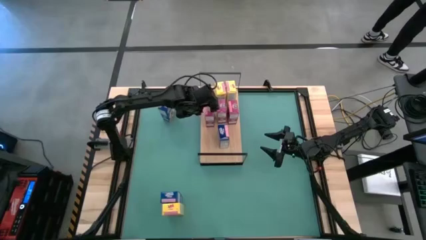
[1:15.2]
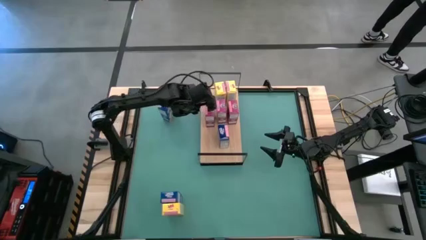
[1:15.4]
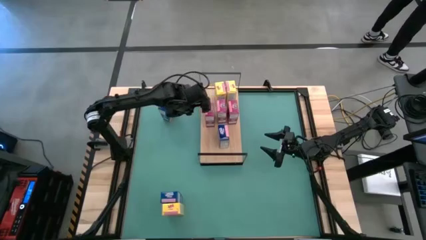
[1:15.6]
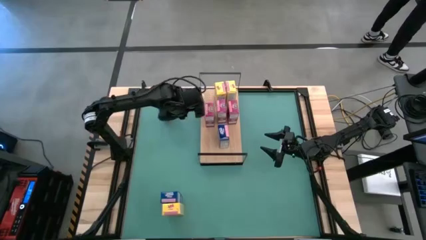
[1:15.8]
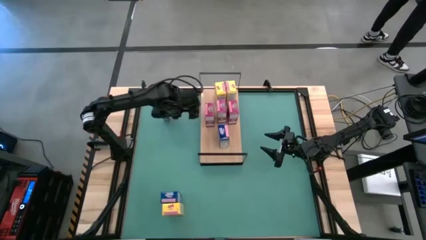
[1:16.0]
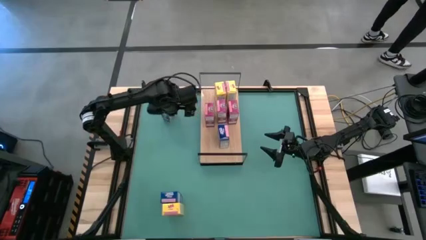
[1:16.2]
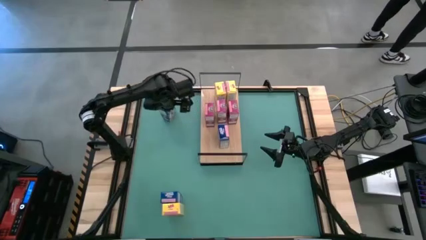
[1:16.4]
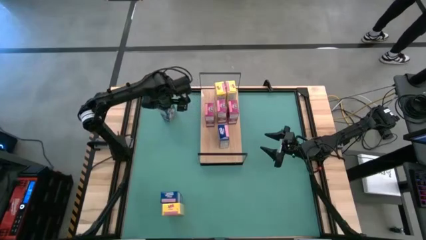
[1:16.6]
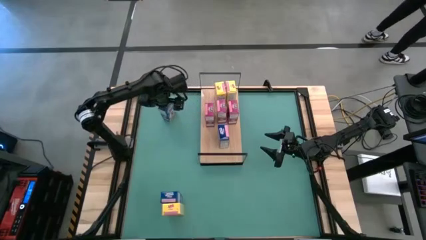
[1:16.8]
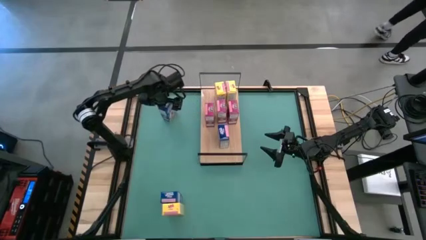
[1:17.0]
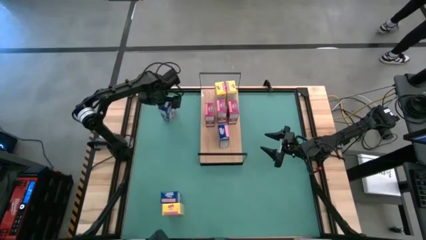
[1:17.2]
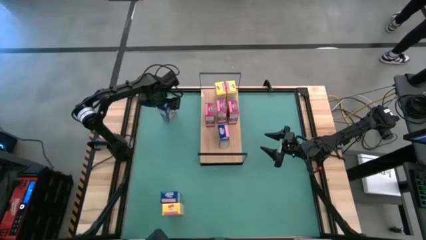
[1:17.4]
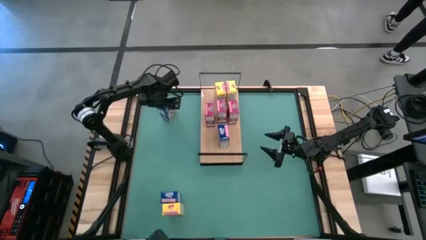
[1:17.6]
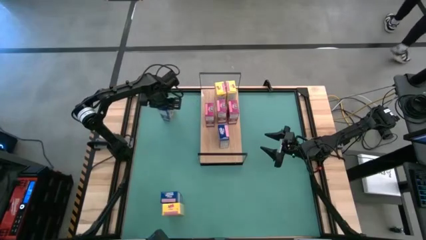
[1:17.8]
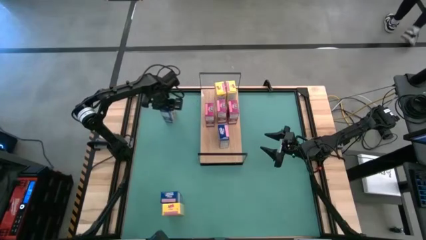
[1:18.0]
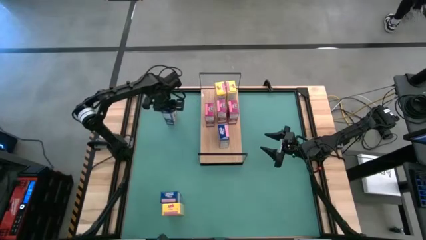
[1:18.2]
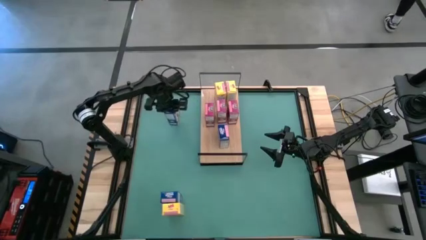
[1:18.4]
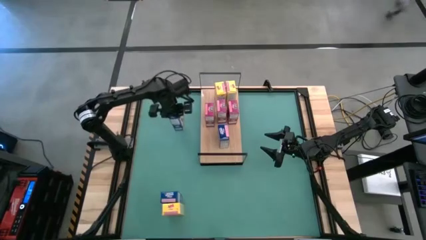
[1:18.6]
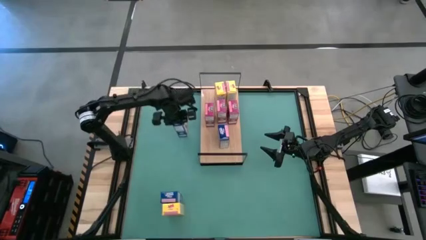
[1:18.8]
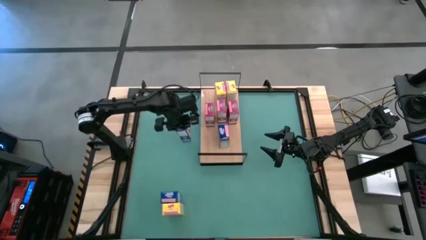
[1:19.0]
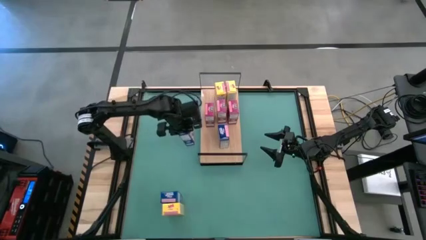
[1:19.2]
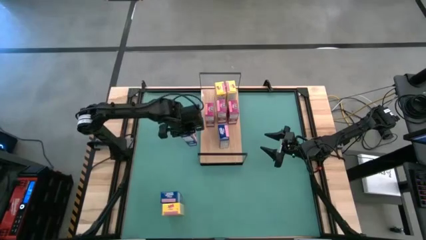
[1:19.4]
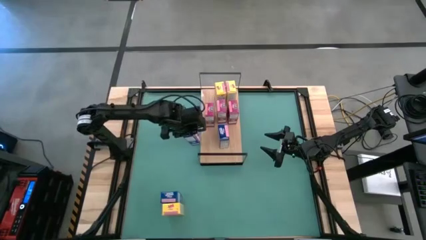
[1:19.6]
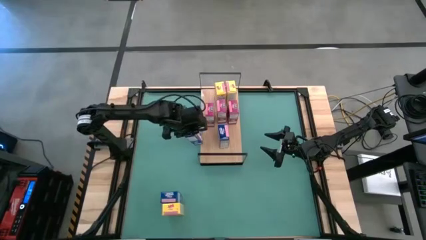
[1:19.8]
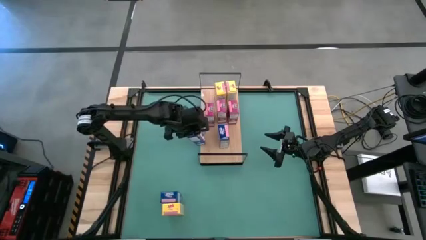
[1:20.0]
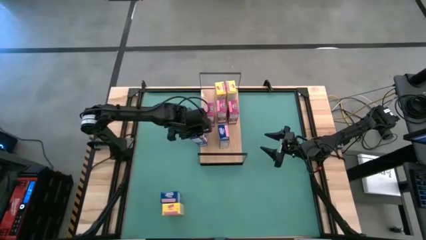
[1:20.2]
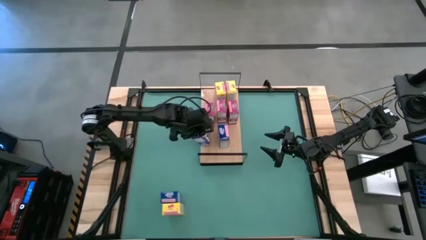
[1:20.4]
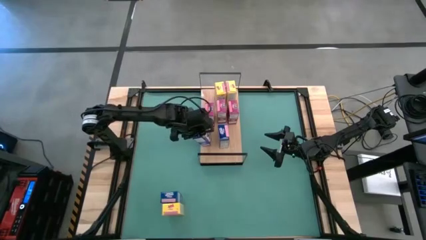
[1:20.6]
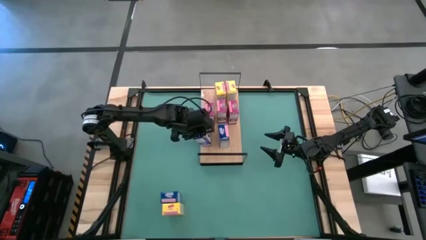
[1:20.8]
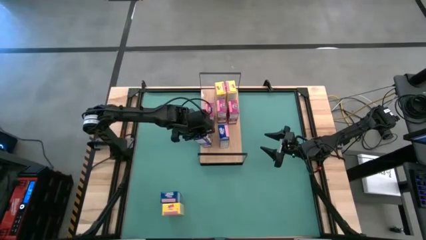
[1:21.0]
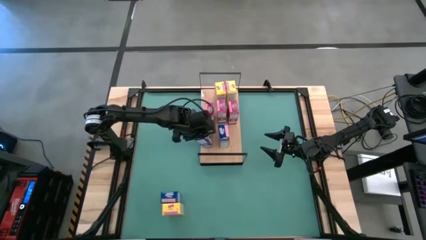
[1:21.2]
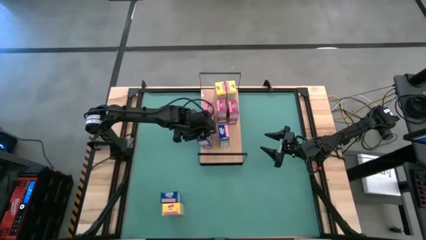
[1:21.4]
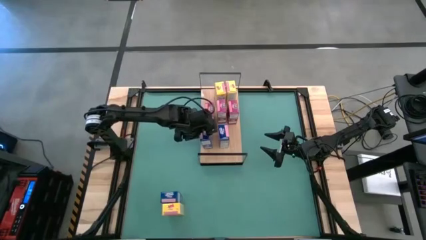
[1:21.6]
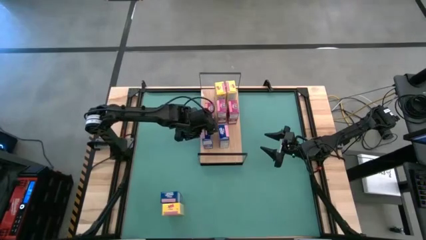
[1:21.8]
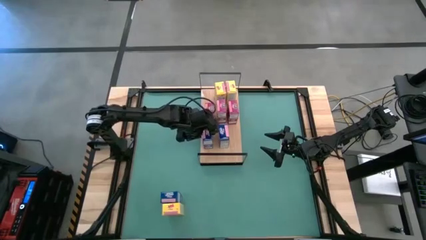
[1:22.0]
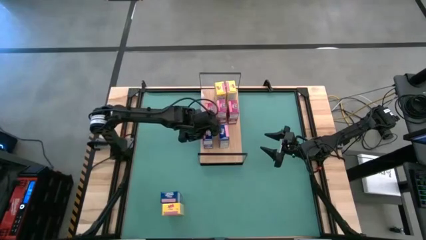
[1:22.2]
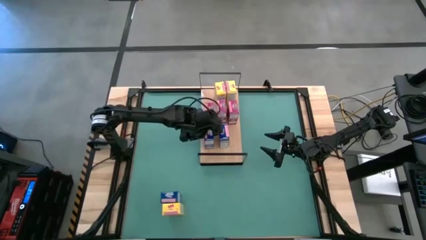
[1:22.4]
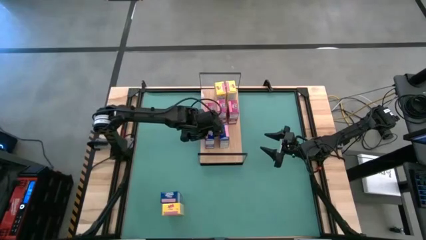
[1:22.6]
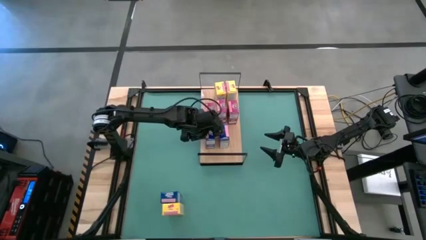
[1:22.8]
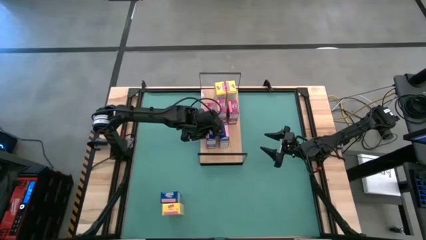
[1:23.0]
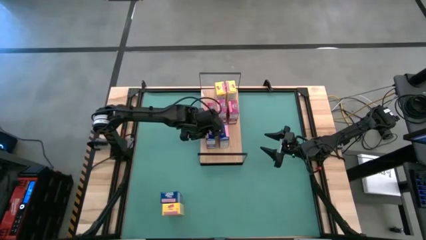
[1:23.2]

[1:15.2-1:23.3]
Task: Stack cereal on shelf
Put the top blue cereal box on the shelf aligned with the other blue cereal box

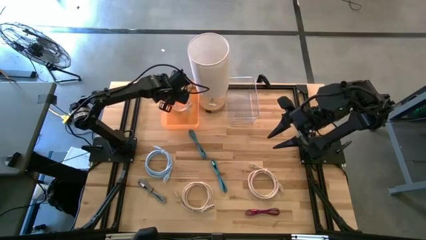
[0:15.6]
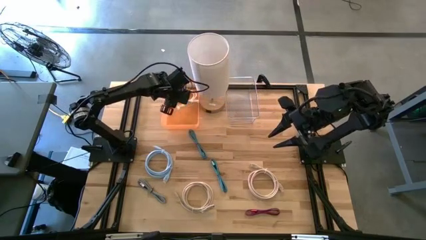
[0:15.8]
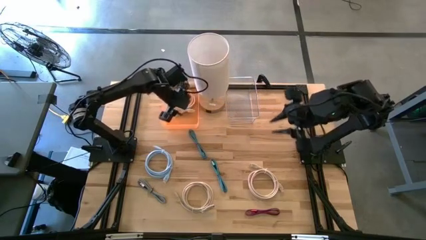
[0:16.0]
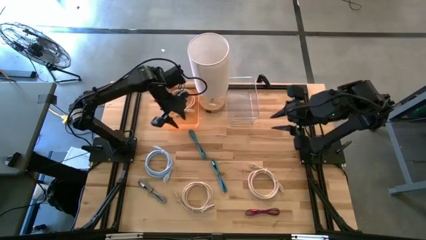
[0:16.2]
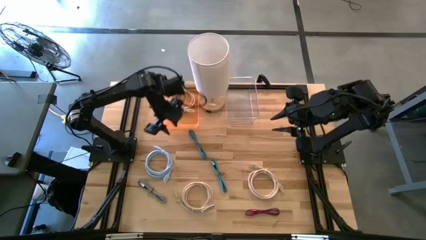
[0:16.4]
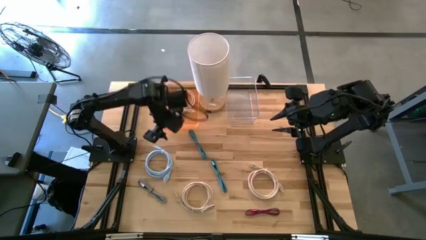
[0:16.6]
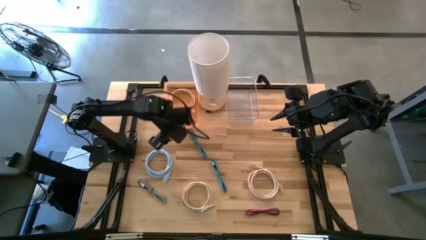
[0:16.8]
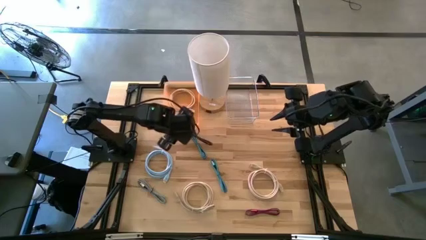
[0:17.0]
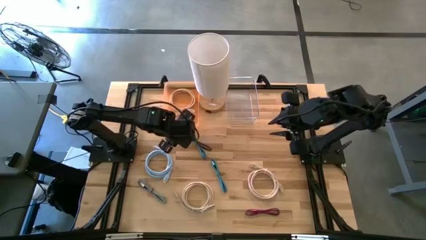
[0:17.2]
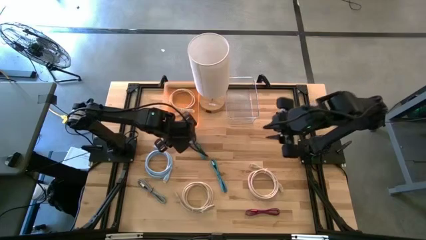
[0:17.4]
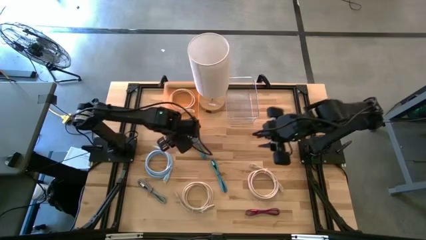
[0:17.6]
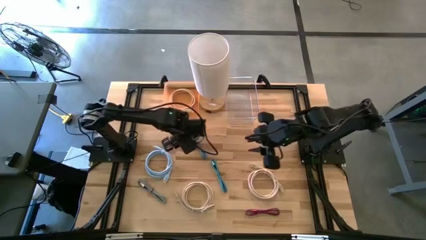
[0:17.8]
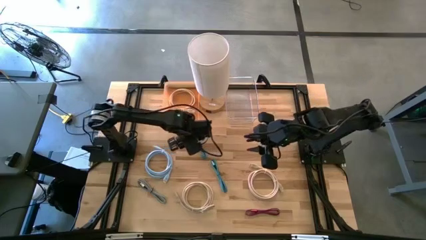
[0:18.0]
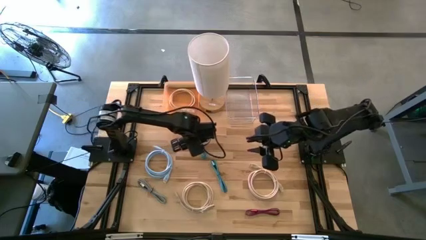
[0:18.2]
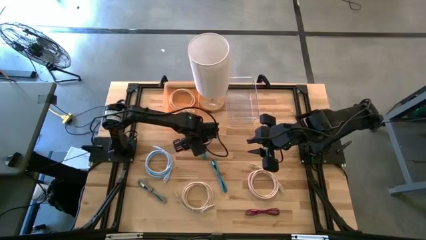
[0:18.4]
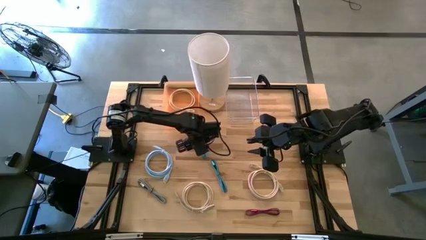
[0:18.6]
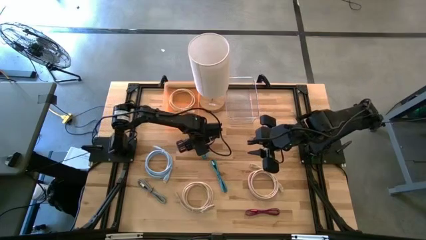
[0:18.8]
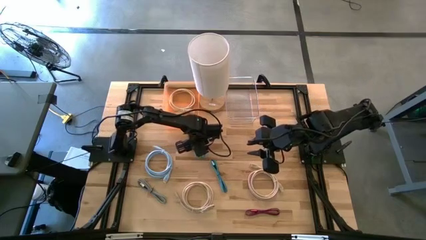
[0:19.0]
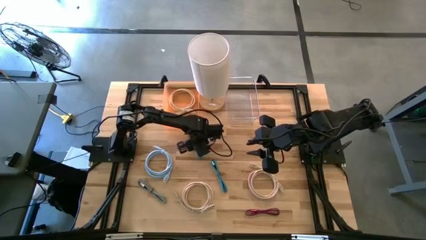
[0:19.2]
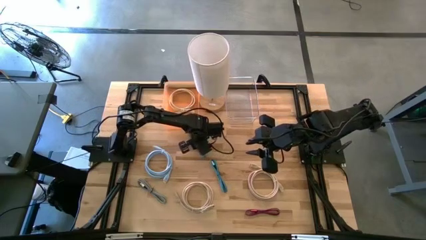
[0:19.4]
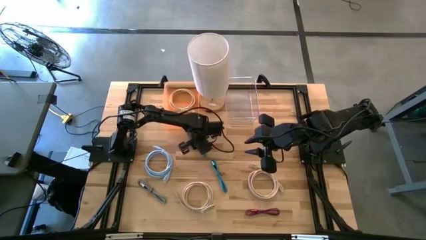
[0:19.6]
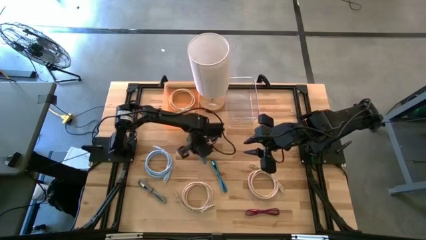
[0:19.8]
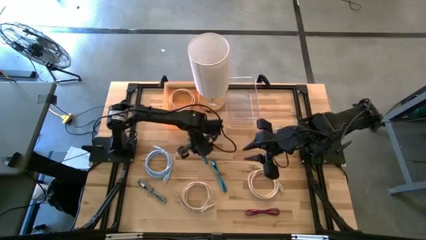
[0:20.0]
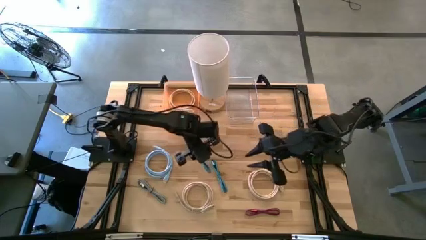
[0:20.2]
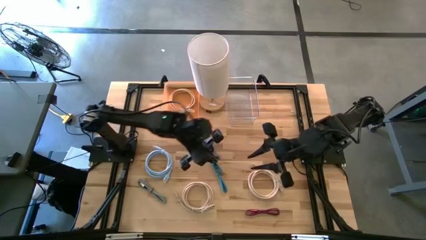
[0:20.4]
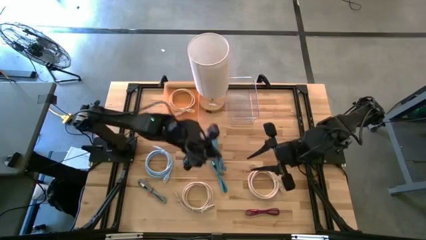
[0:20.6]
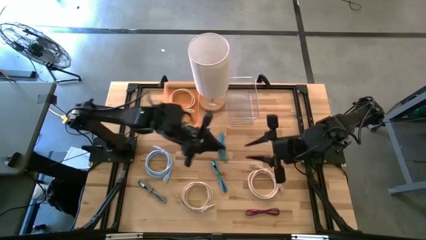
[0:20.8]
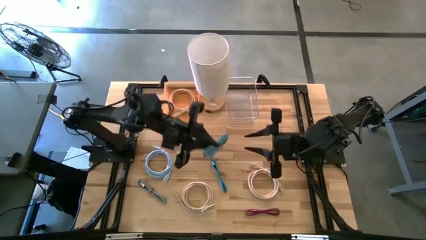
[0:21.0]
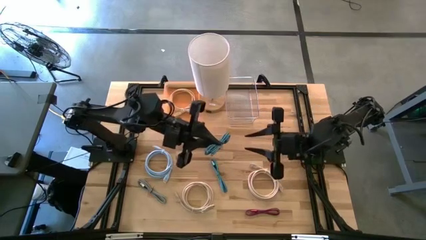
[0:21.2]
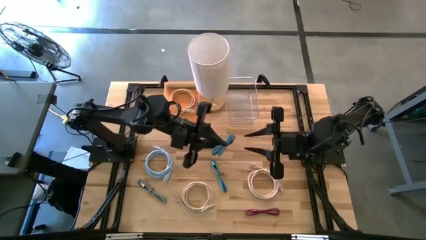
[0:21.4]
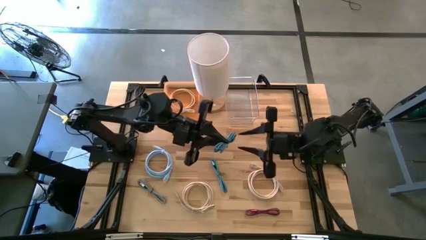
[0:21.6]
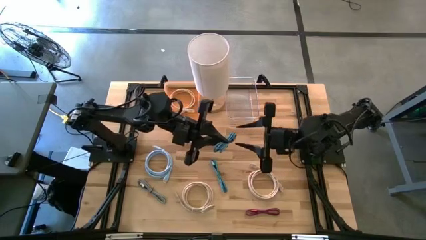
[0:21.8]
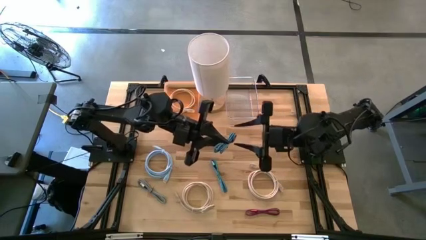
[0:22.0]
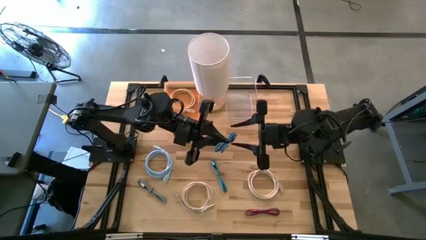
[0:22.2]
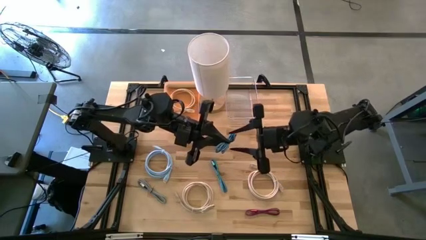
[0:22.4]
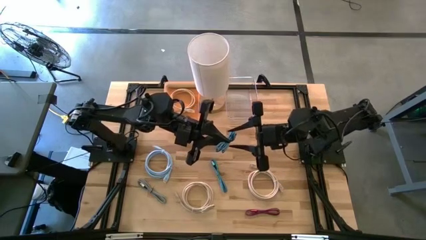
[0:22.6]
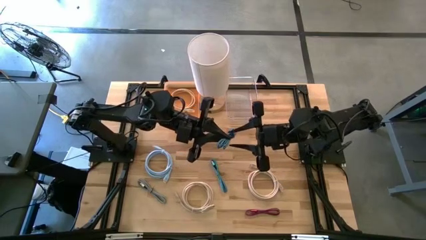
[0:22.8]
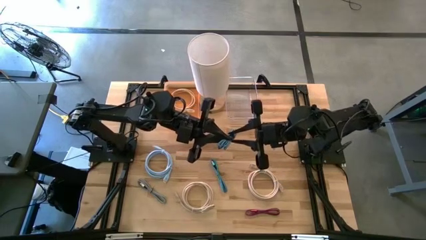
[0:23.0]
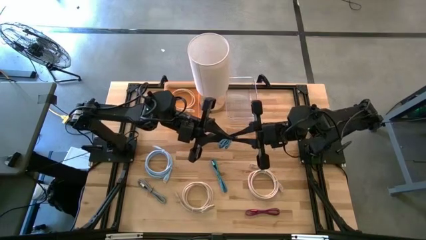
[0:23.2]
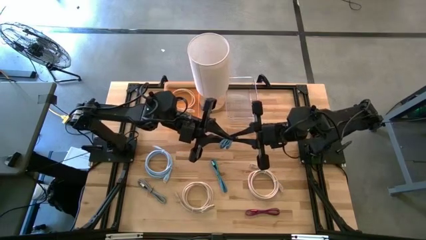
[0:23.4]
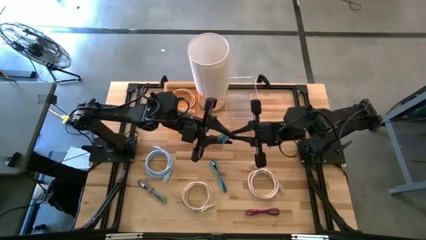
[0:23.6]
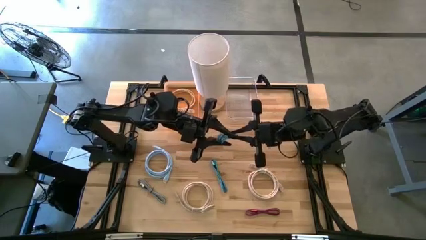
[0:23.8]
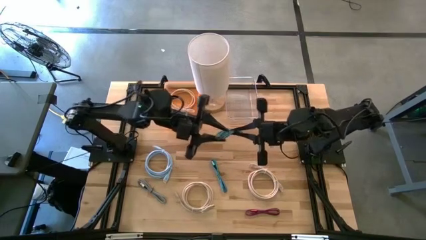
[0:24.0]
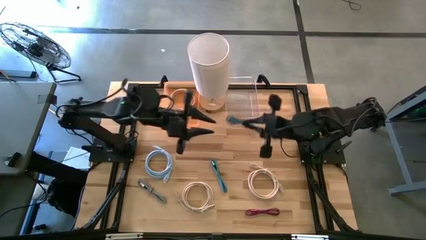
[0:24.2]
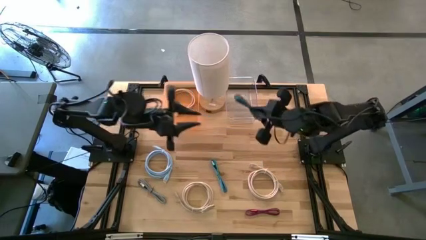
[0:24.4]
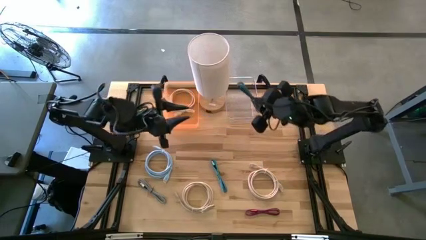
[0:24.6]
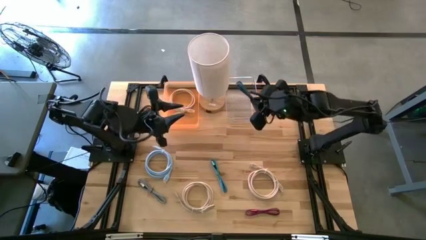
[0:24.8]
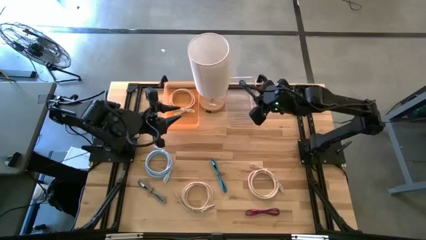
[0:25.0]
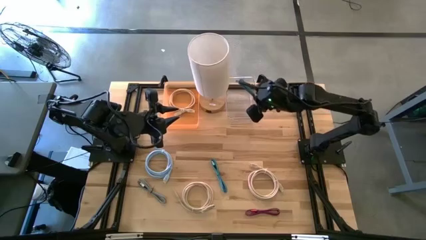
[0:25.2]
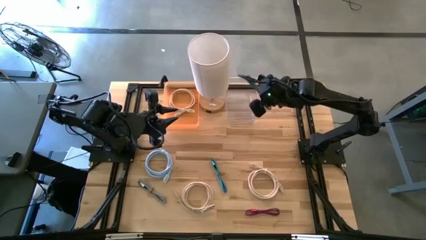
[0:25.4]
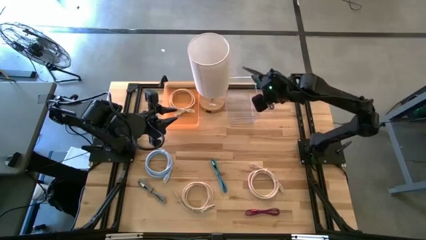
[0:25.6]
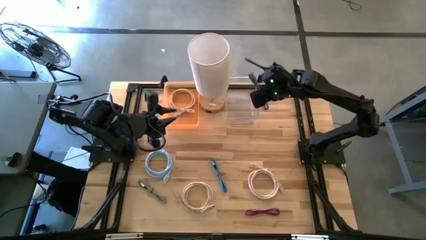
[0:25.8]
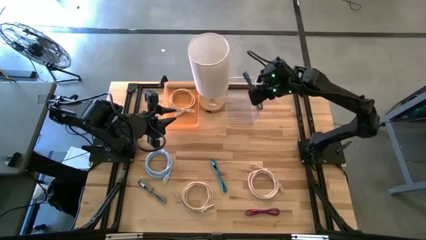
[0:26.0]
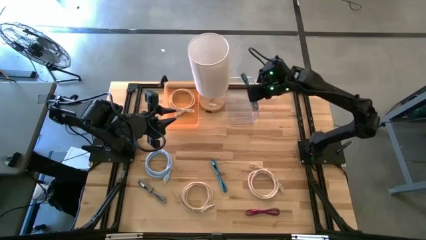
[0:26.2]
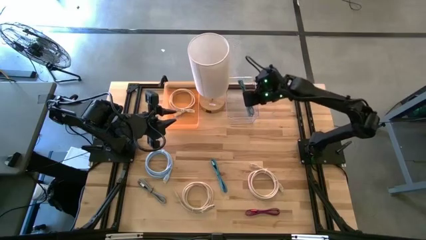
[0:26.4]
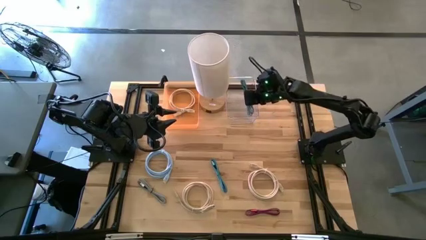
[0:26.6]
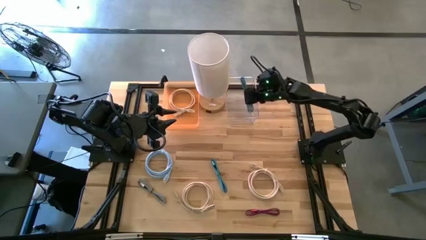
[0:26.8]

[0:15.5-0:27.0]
Task: Pick & Place USB Port
Put the top blue and black charger cable into the transparent bin
